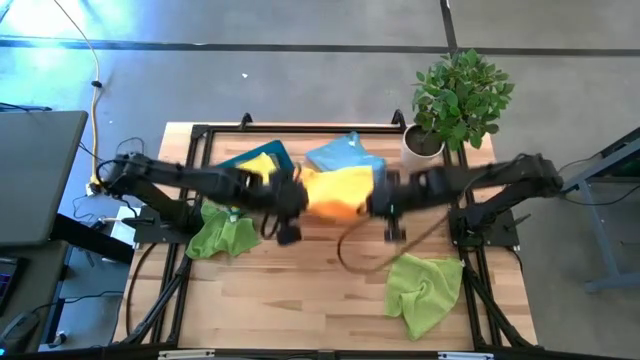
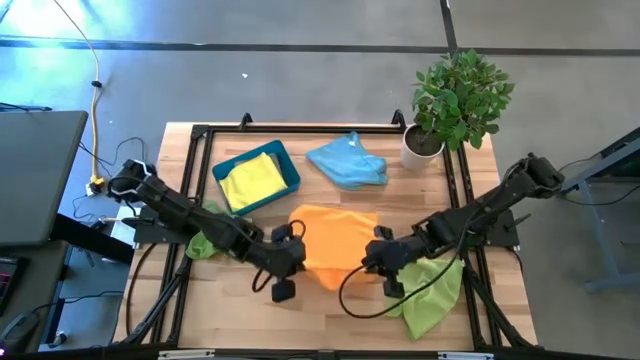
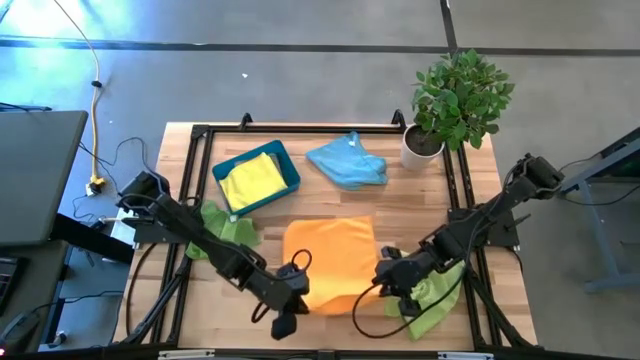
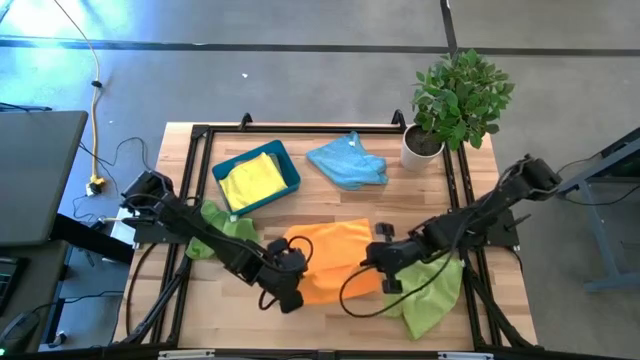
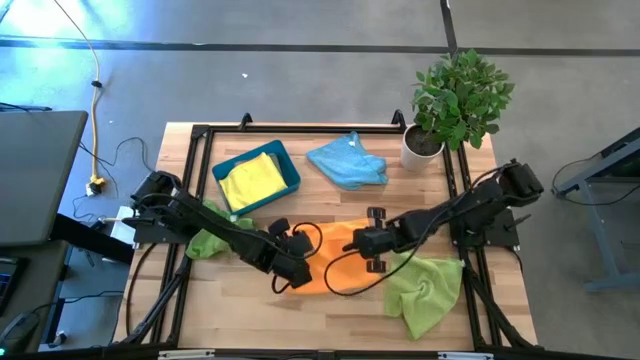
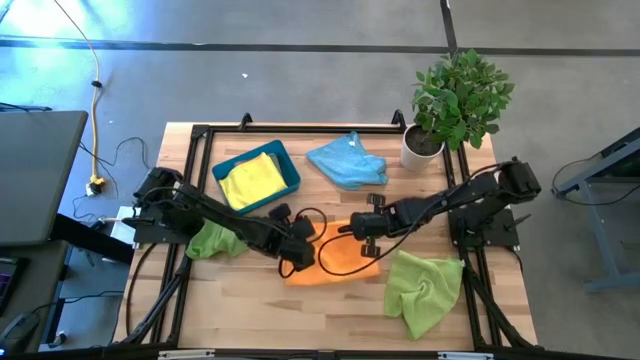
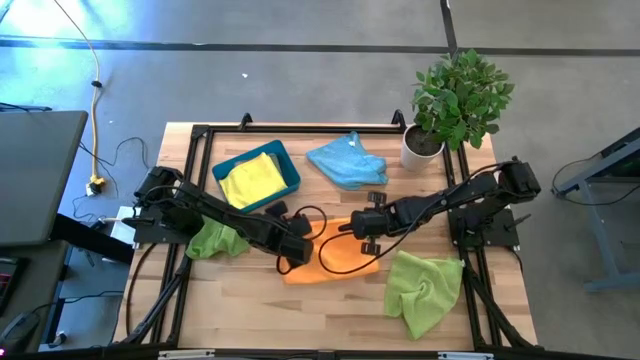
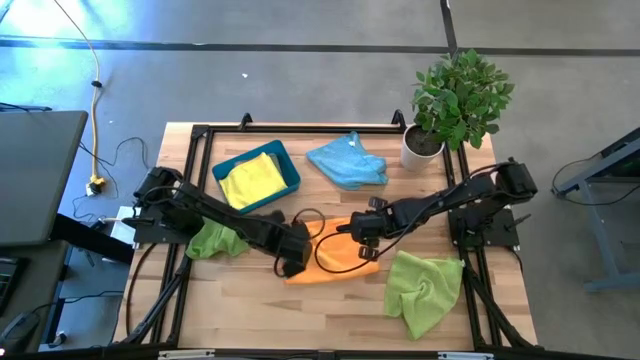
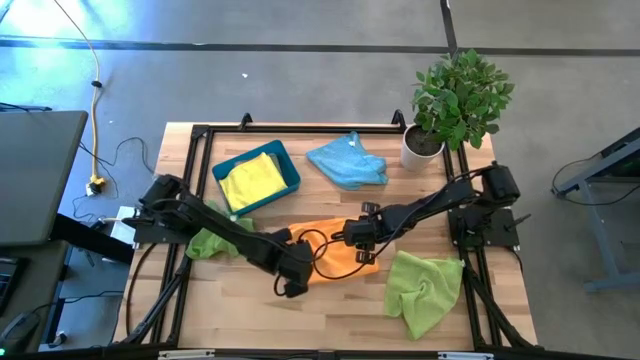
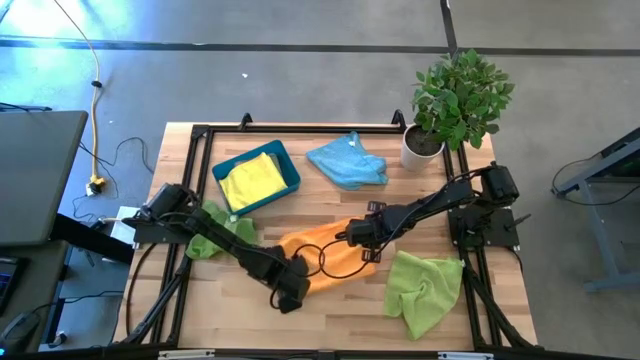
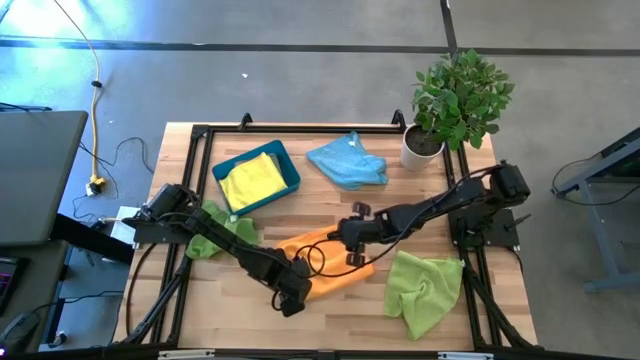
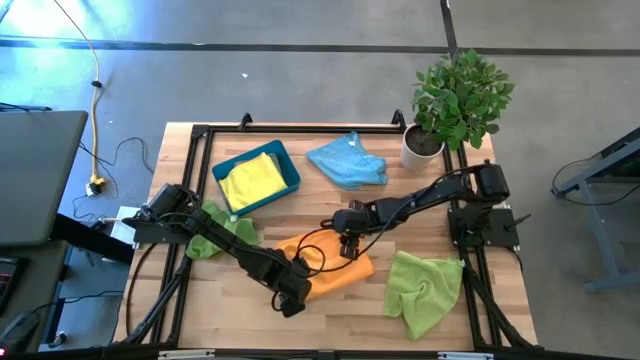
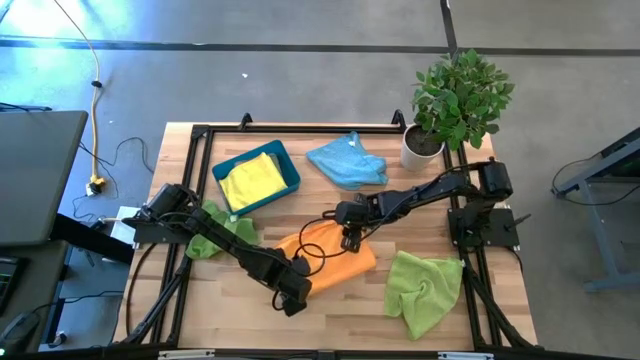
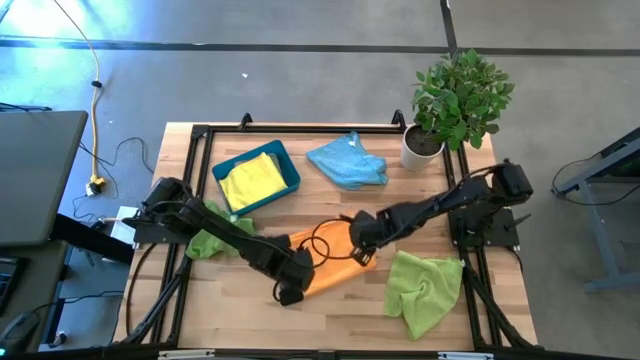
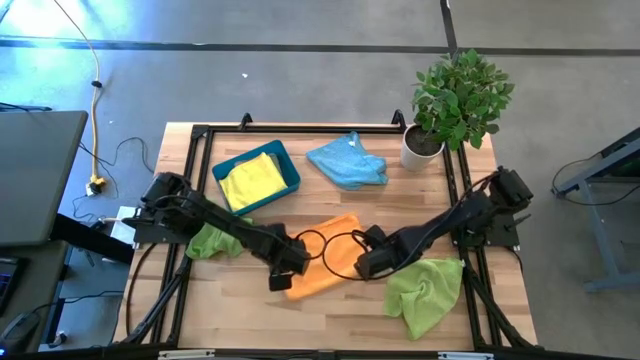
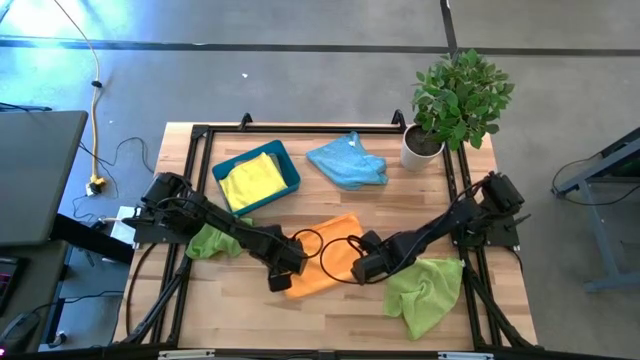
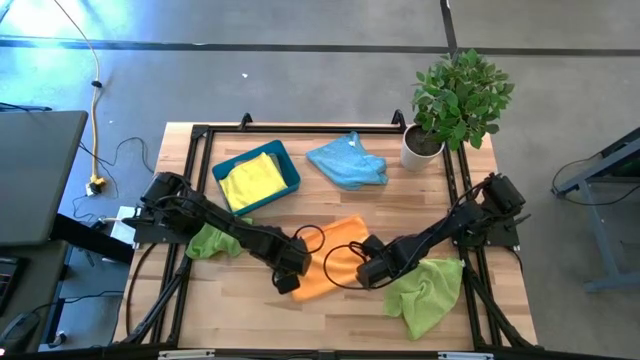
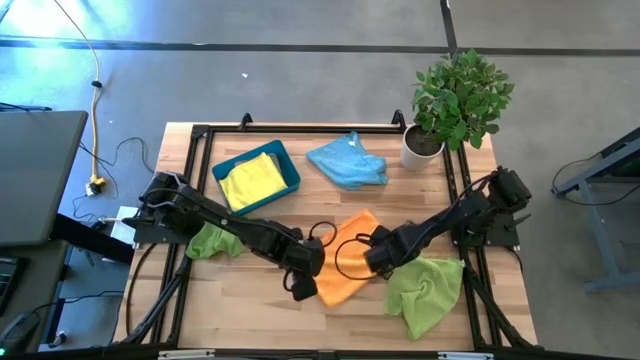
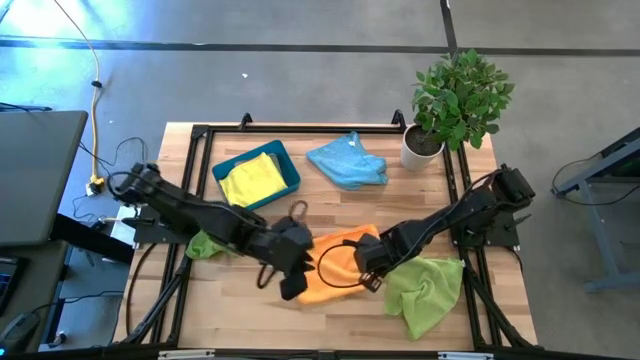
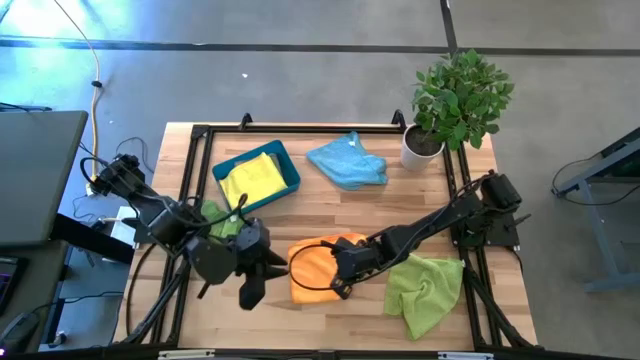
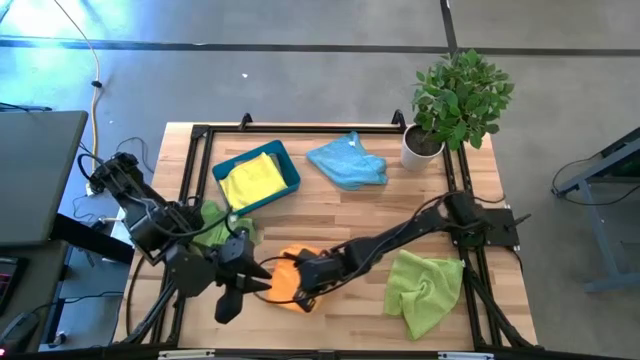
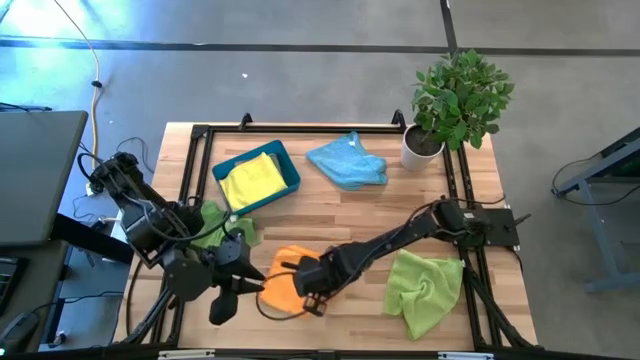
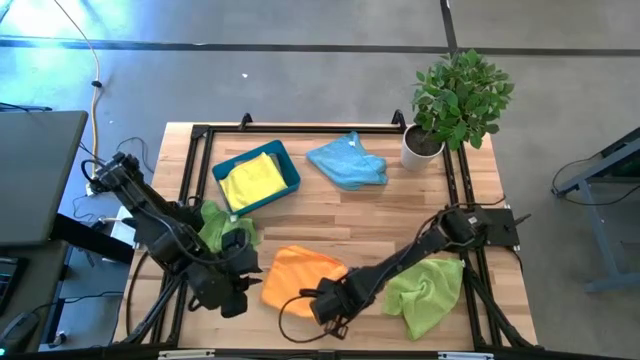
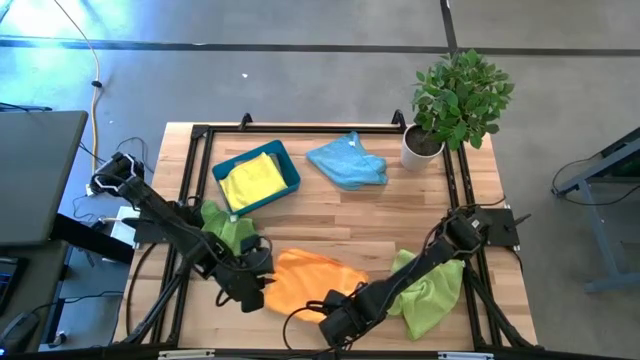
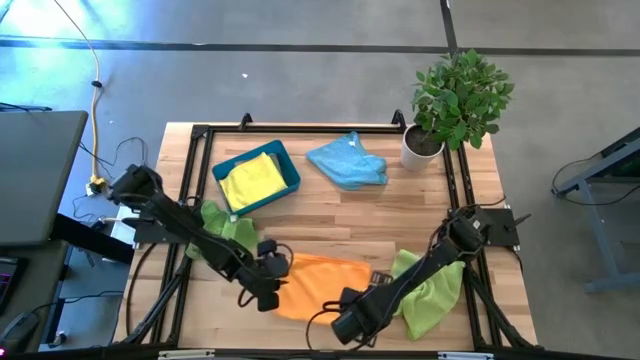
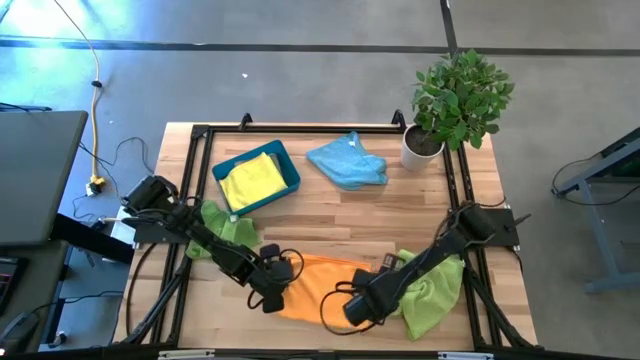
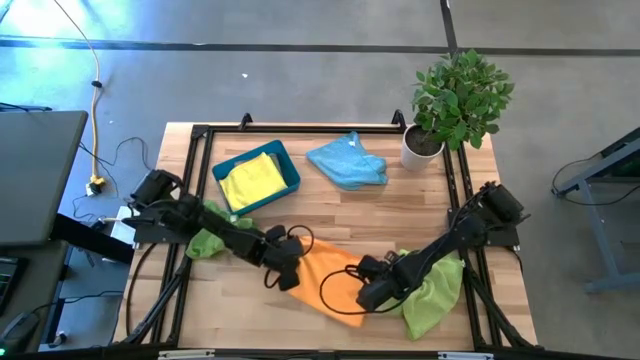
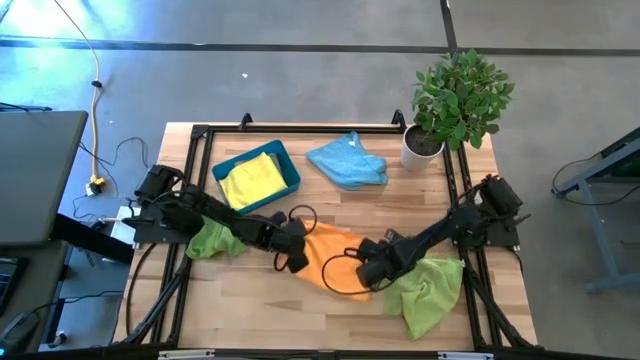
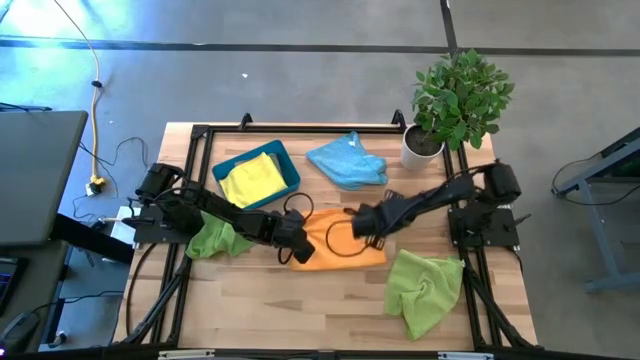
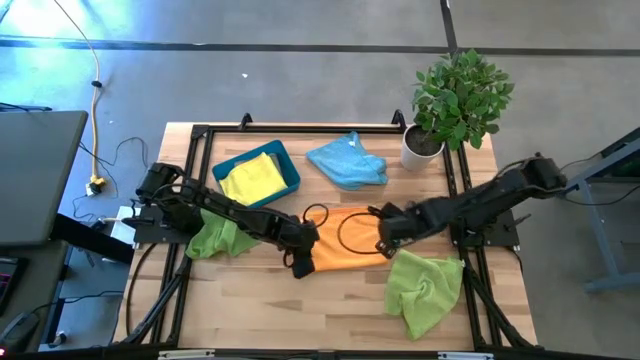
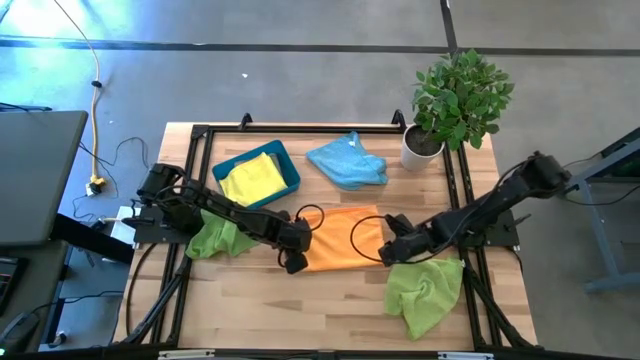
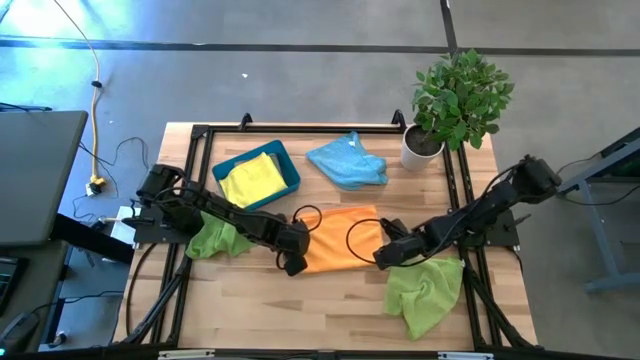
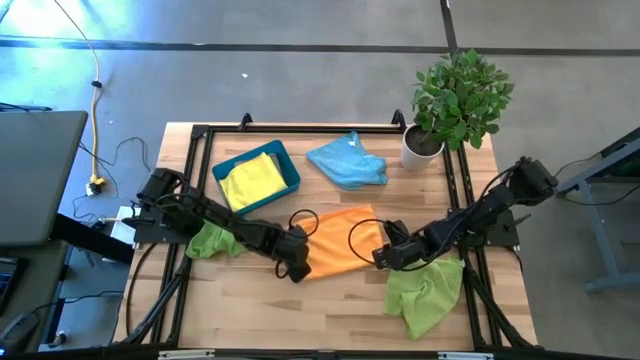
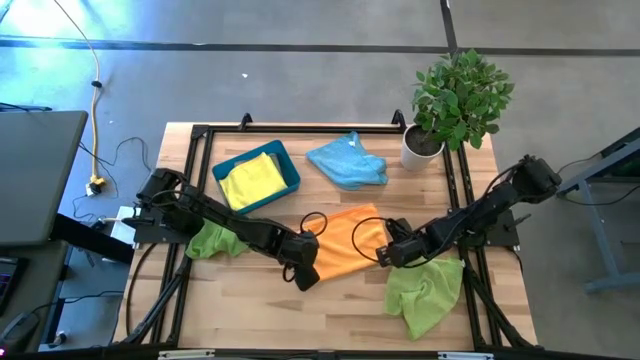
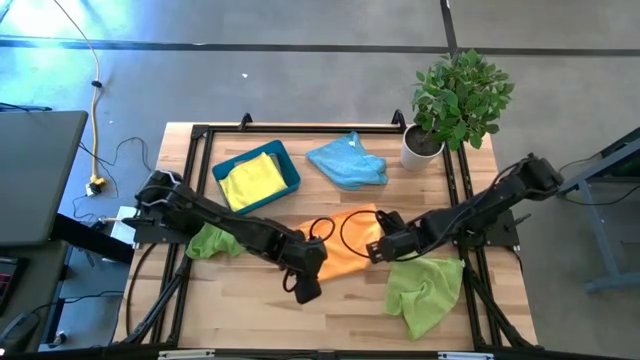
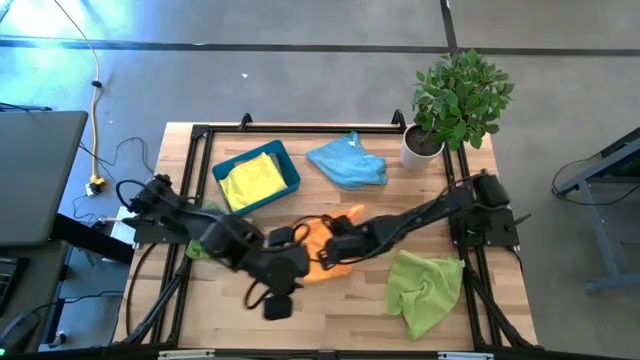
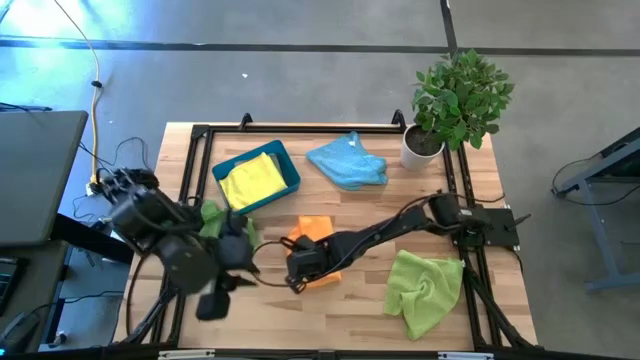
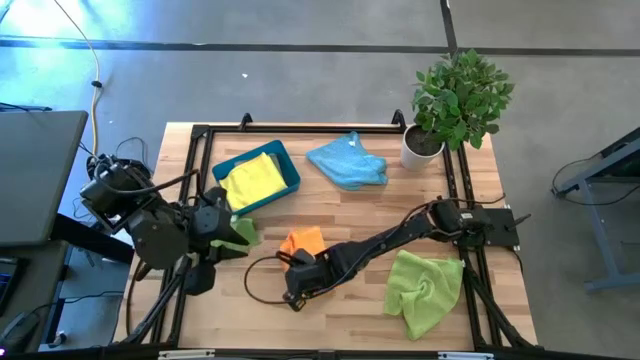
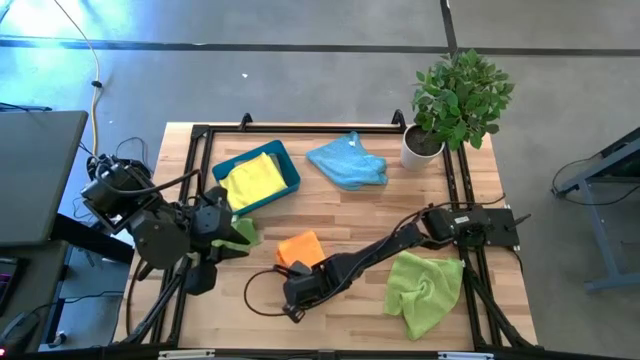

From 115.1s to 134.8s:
Task: Fold microfiber towels
Fold the orange microfiber cloth
